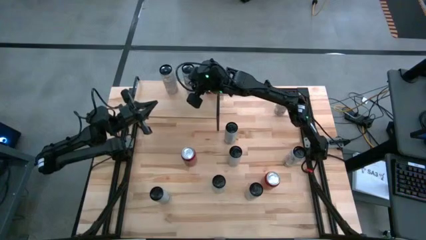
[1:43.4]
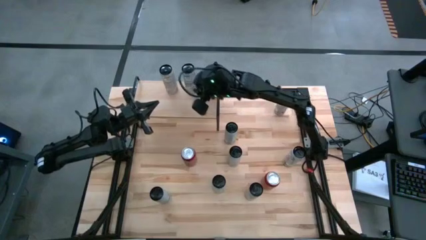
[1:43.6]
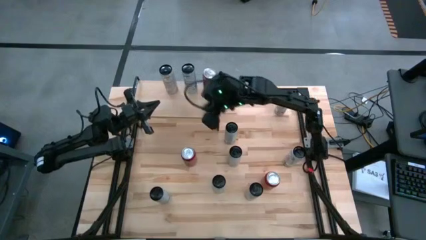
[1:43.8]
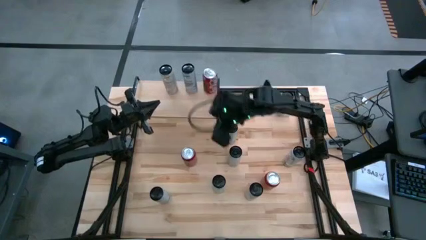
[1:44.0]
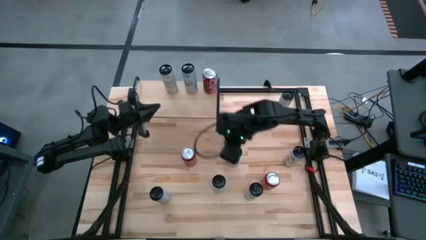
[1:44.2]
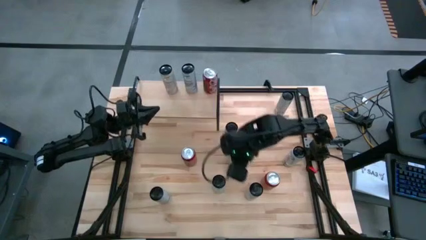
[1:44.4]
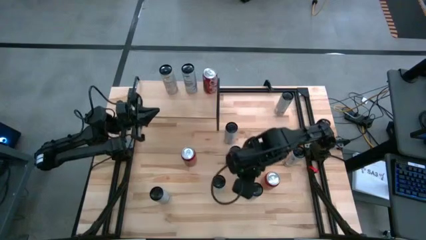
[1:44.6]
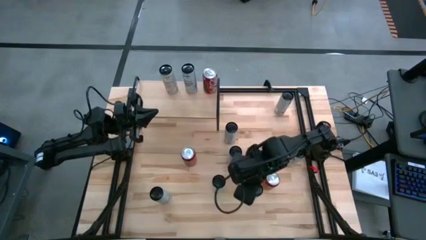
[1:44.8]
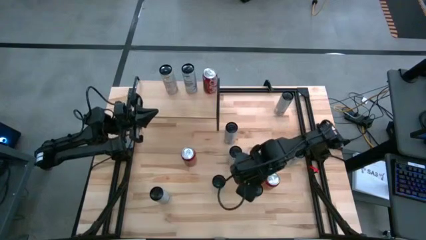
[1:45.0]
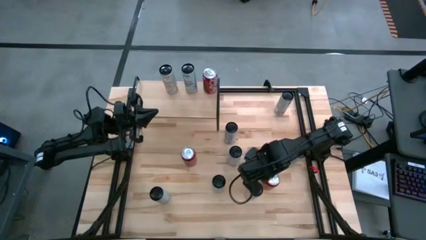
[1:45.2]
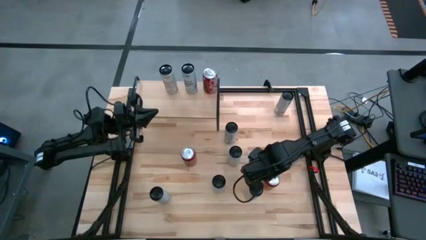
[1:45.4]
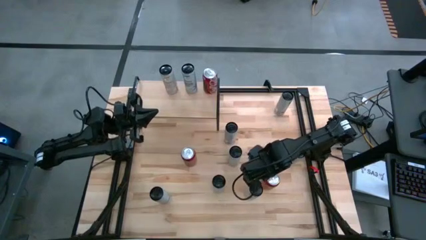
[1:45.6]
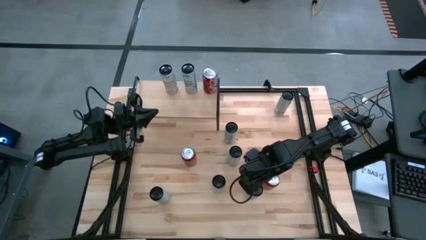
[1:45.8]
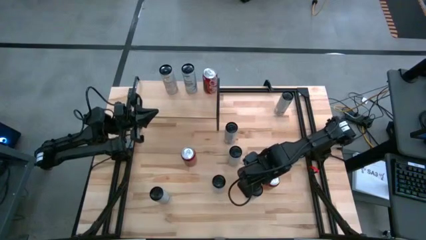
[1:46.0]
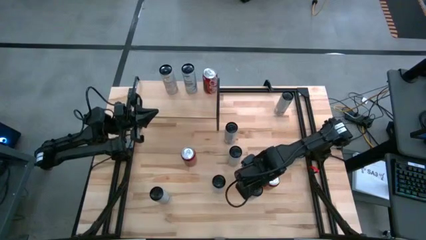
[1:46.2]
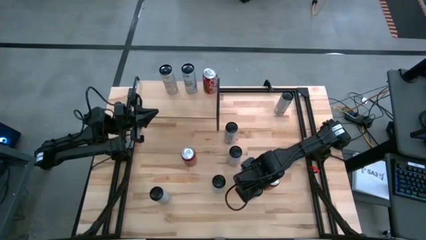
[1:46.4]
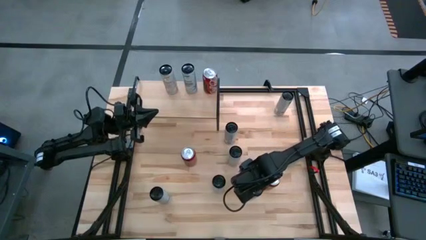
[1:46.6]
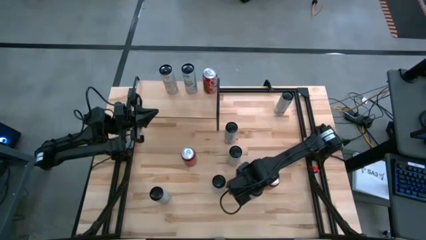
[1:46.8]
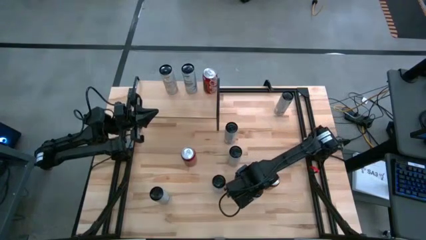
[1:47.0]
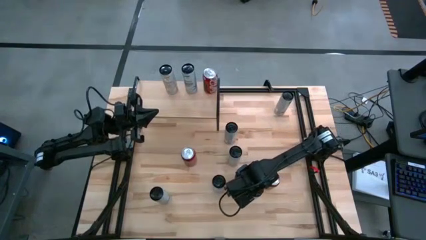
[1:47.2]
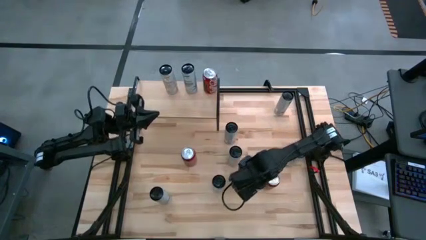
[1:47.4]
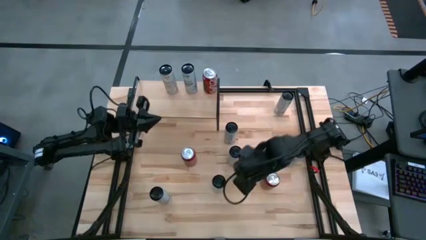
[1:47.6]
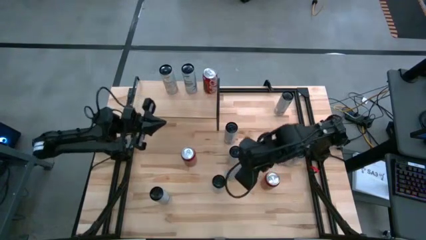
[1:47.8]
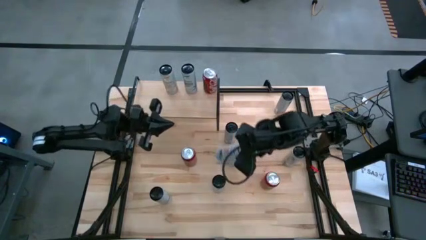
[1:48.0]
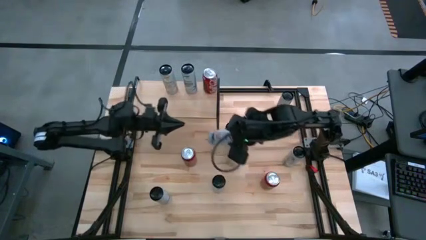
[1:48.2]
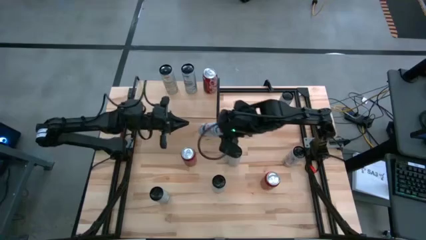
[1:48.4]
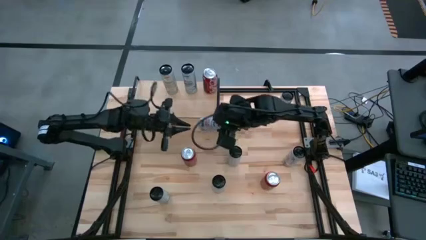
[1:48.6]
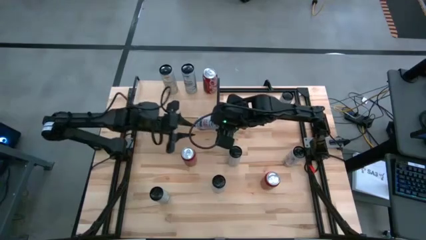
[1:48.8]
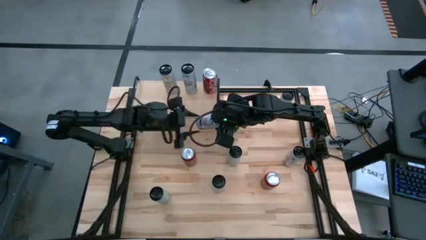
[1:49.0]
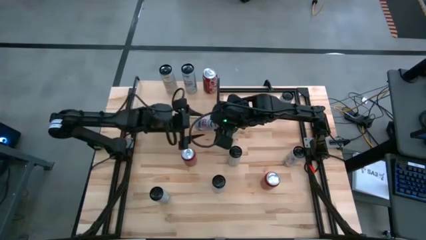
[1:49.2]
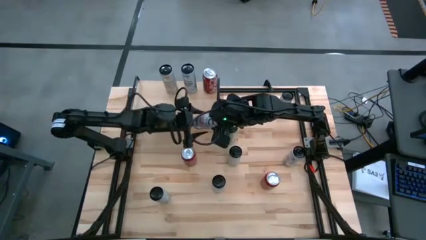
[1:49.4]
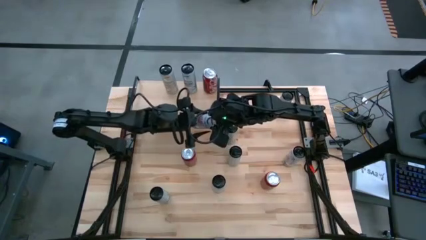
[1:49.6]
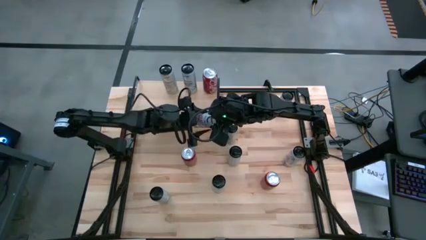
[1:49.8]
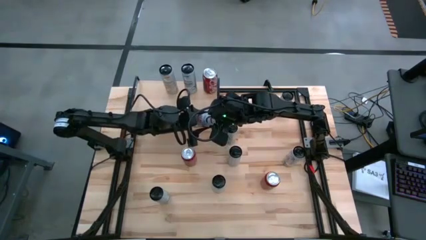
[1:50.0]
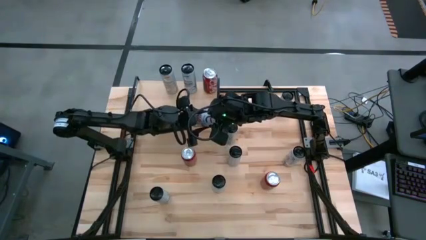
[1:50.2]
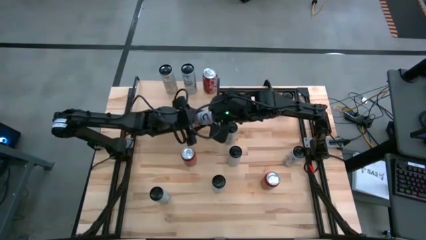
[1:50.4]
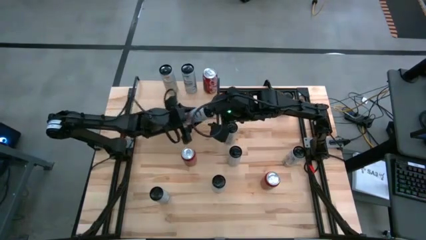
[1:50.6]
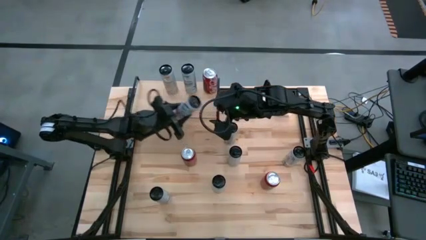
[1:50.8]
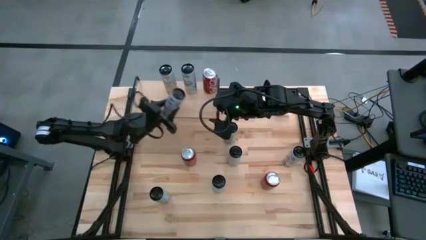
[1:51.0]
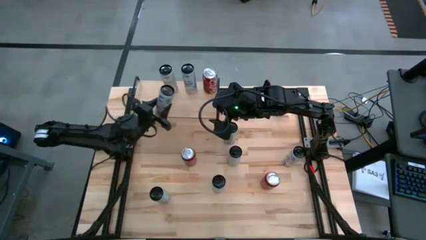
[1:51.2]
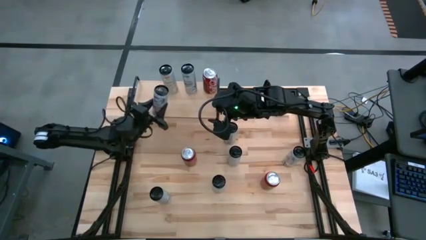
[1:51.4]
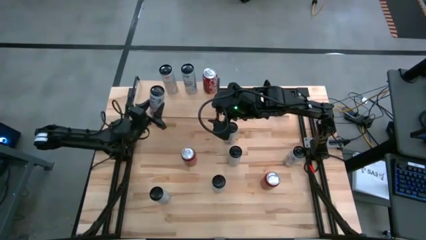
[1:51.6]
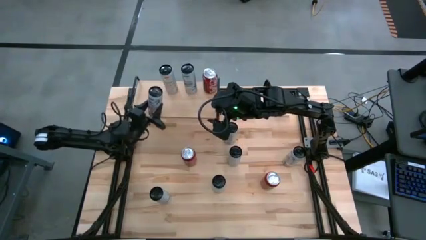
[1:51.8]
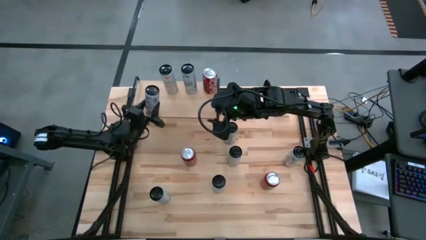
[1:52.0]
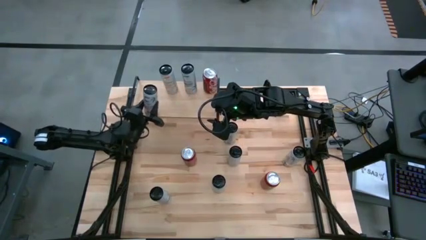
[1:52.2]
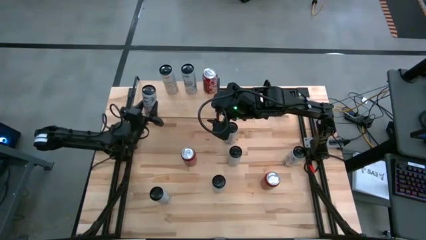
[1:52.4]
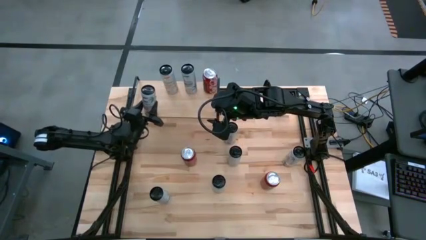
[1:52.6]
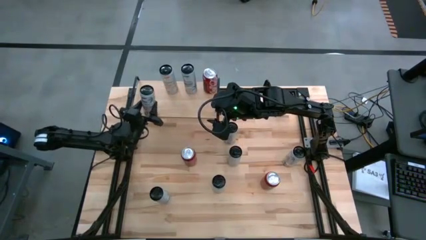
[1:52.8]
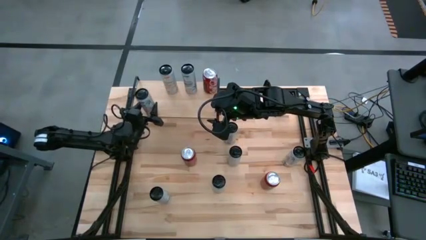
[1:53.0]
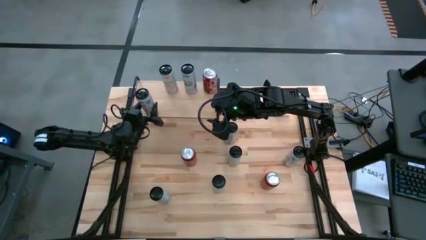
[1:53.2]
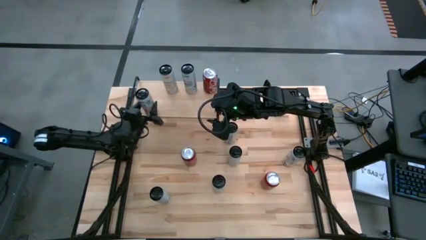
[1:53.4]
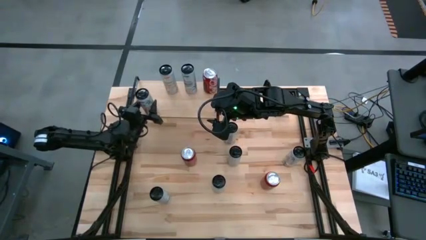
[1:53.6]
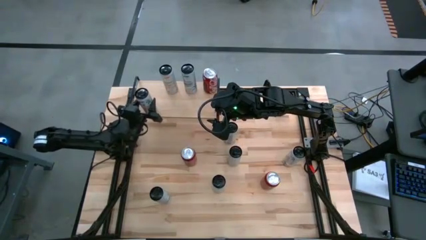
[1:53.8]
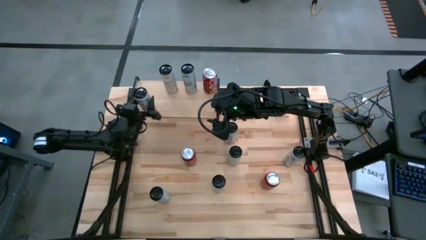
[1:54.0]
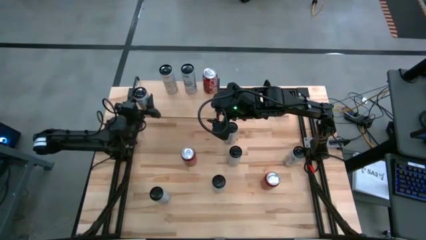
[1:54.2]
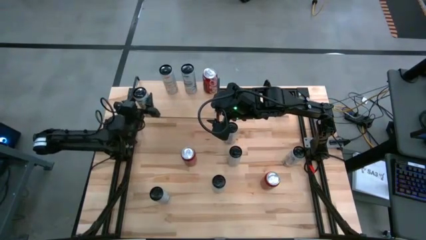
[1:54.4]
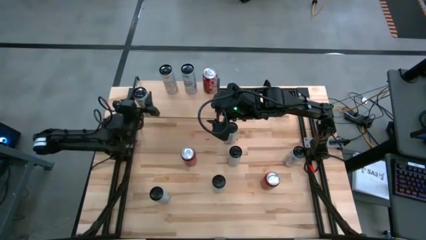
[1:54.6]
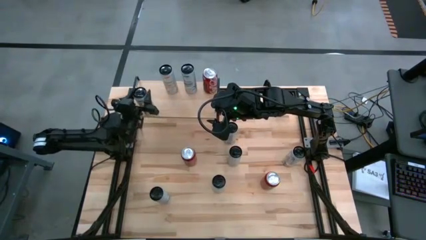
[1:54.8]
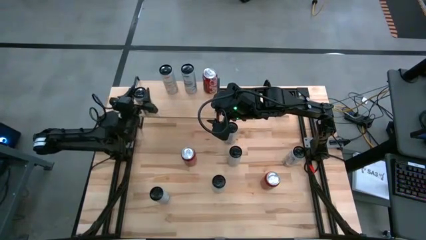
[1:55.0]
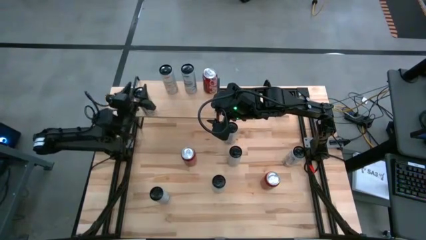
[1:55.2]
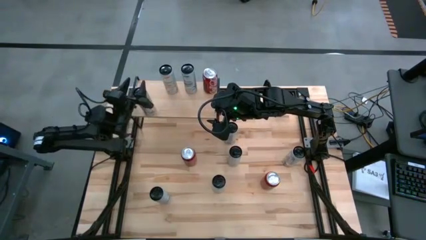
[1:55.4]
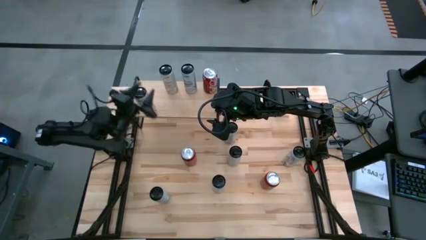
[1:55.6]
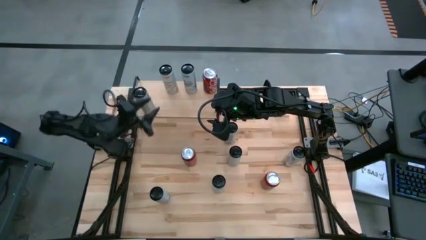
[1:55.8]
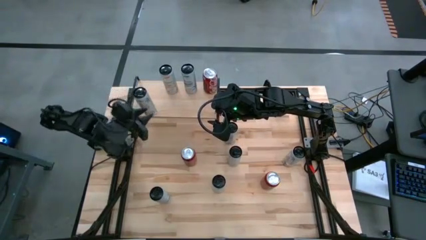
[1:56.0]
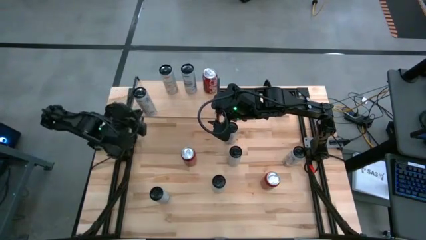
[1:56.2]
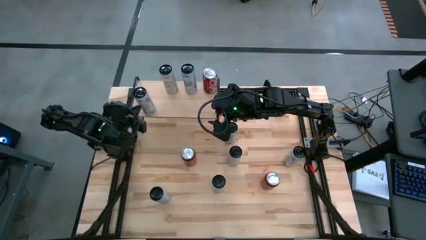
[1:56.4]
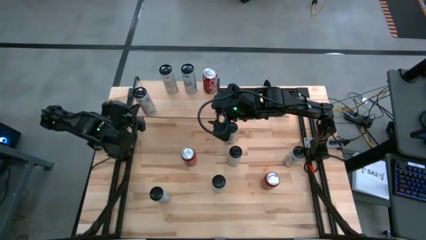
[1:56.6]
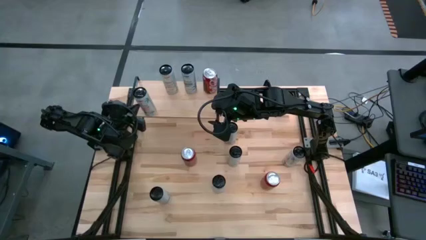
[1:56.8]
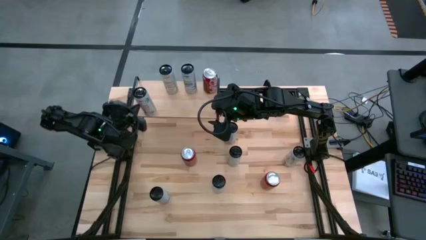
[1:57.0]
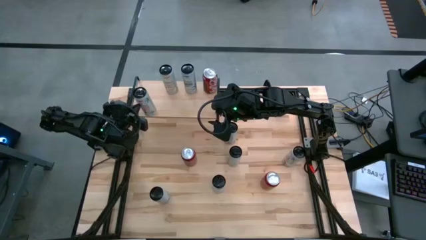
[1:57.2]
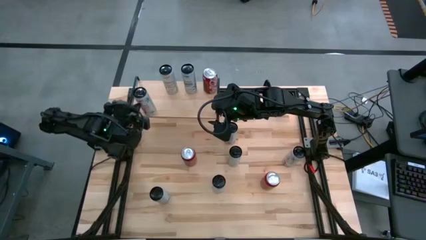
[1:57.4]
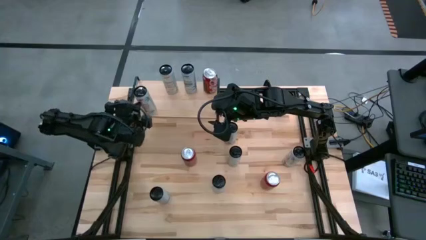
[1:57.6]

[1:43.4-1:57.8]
Task: Place canned beverage on shelf
Put the bottom left white pink soda can on the shelf
